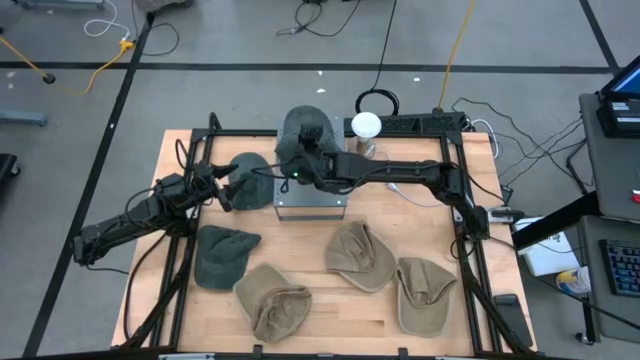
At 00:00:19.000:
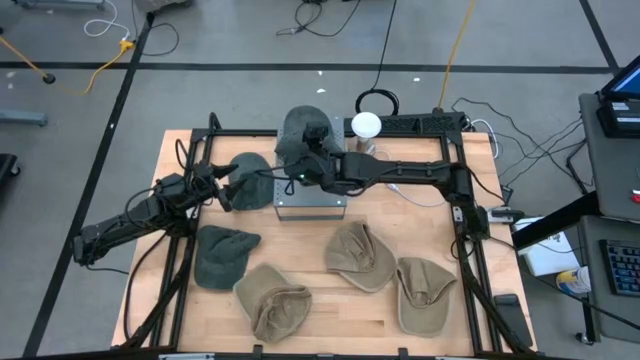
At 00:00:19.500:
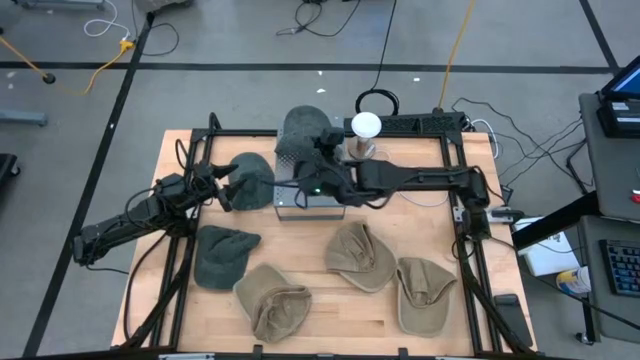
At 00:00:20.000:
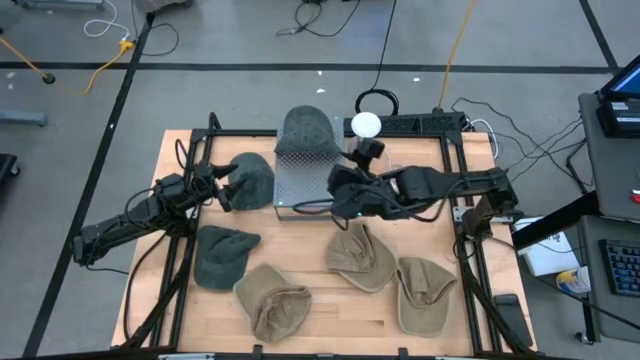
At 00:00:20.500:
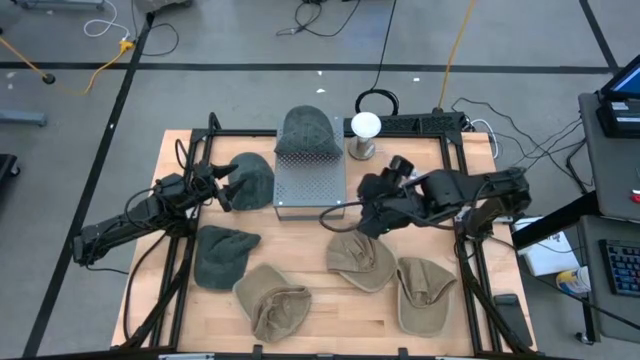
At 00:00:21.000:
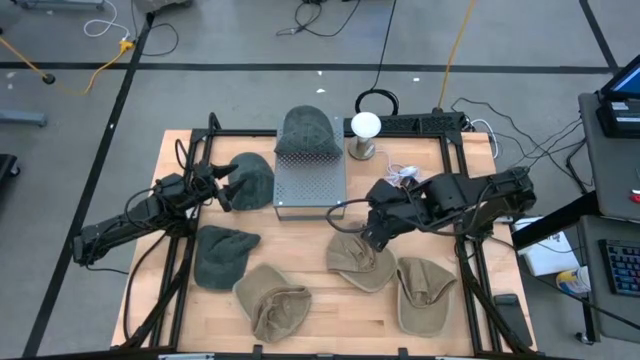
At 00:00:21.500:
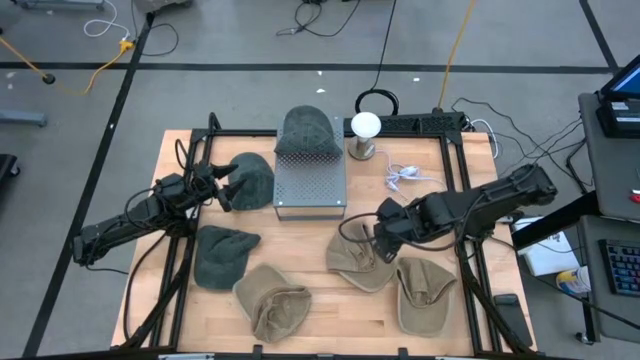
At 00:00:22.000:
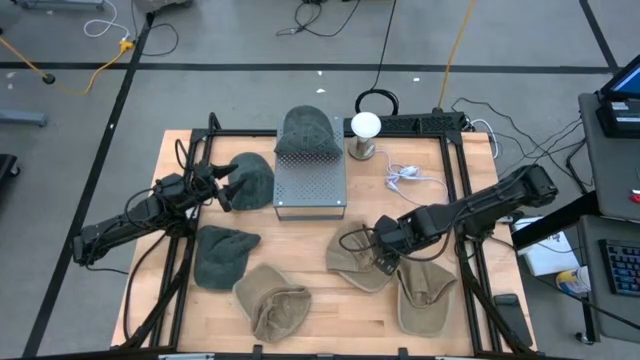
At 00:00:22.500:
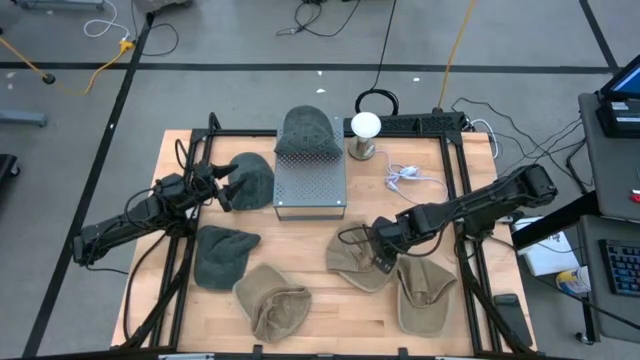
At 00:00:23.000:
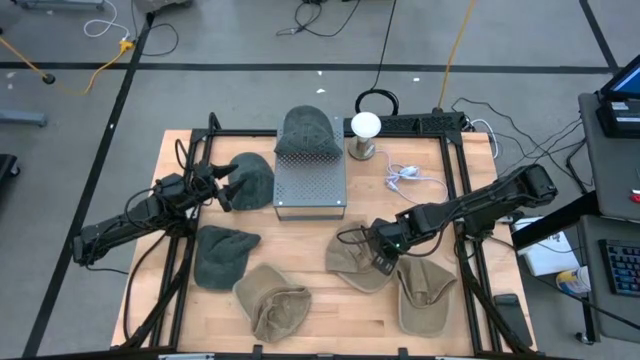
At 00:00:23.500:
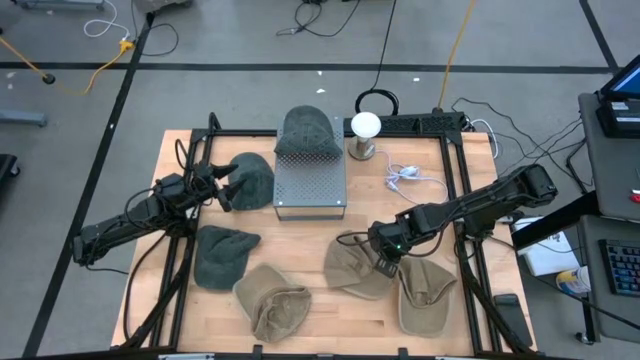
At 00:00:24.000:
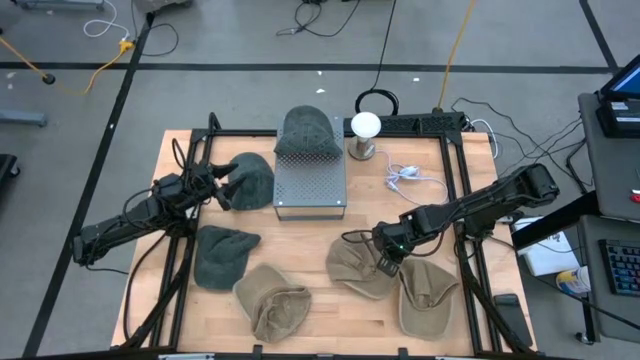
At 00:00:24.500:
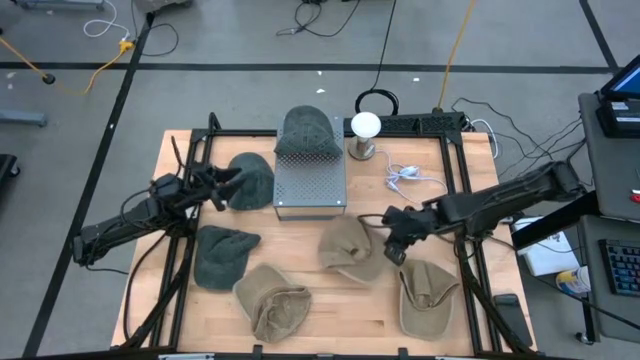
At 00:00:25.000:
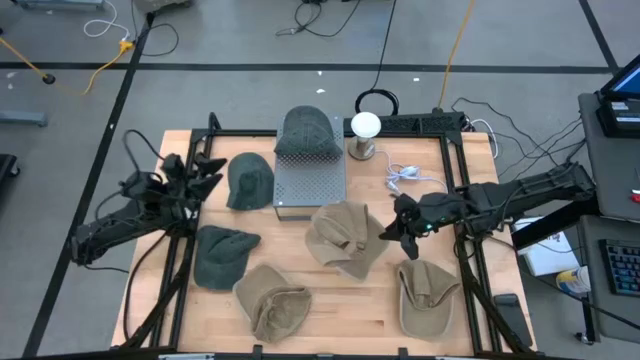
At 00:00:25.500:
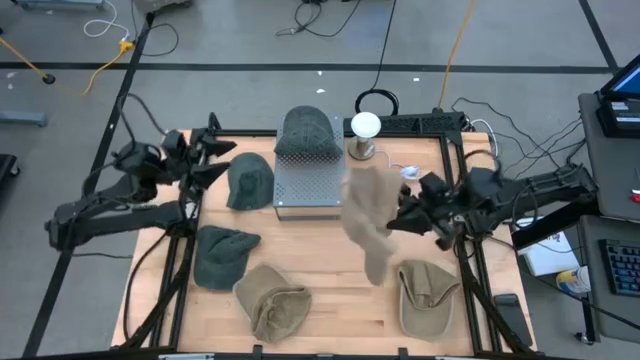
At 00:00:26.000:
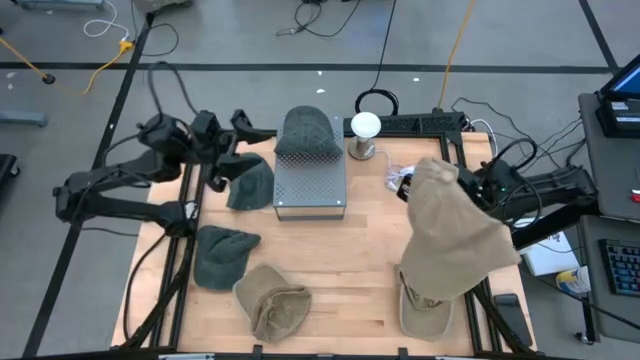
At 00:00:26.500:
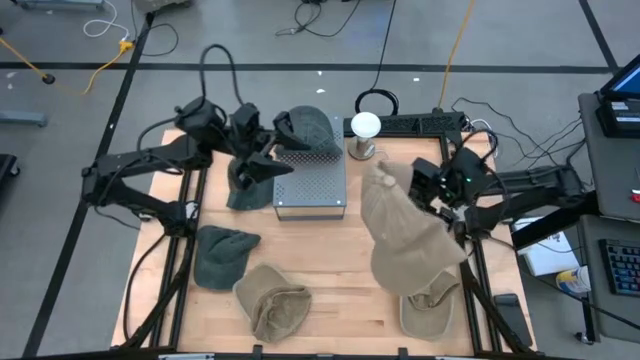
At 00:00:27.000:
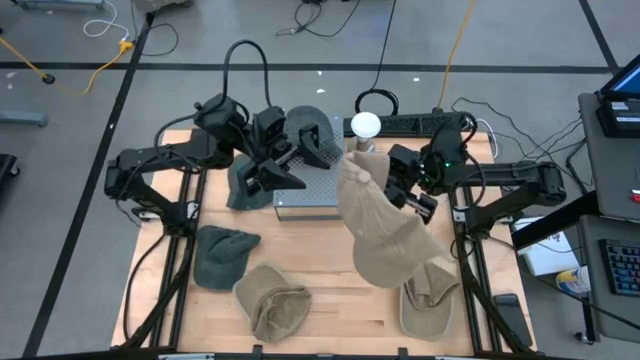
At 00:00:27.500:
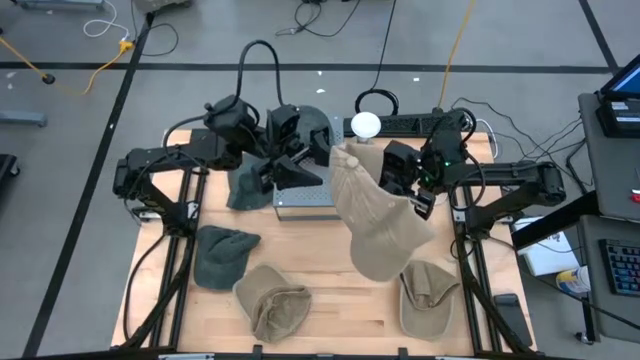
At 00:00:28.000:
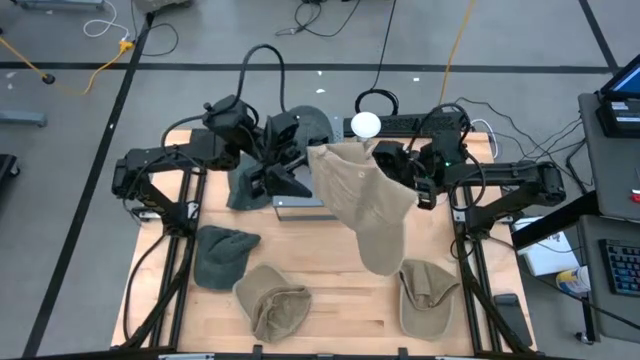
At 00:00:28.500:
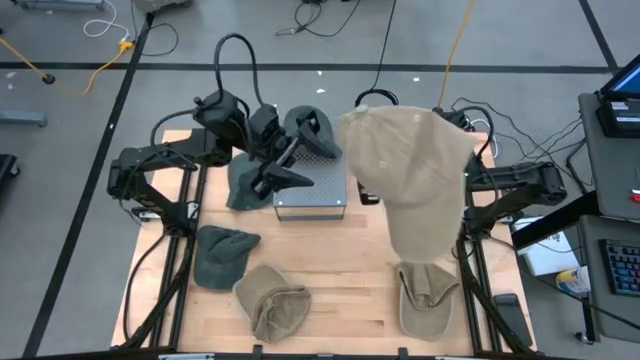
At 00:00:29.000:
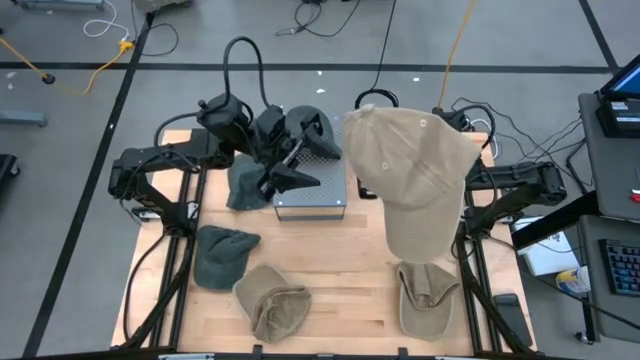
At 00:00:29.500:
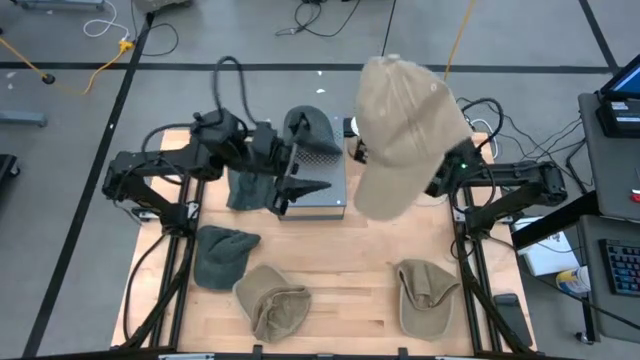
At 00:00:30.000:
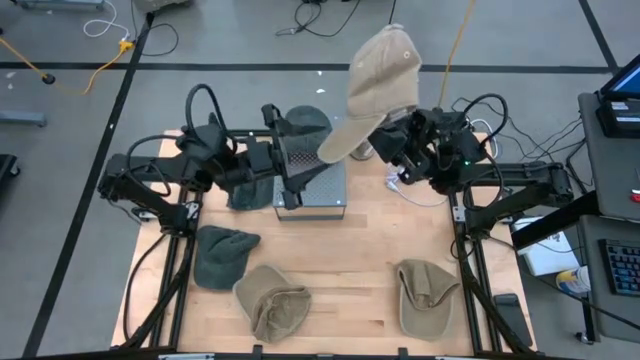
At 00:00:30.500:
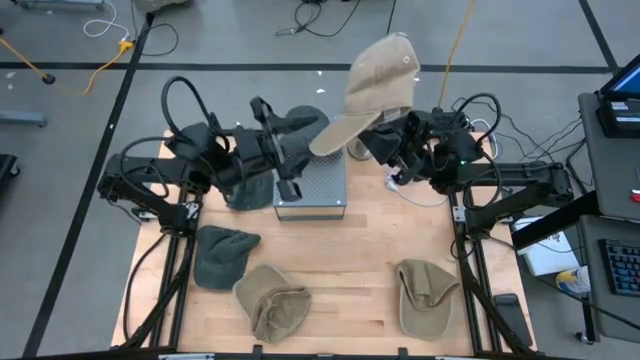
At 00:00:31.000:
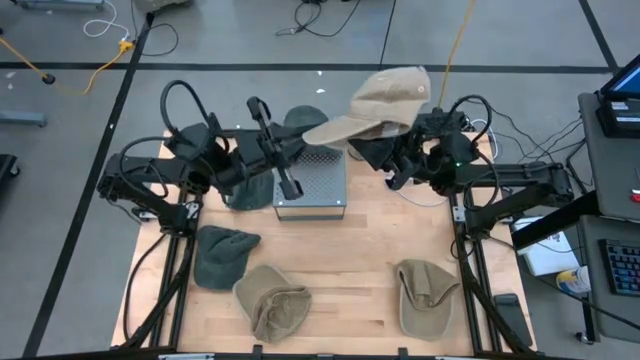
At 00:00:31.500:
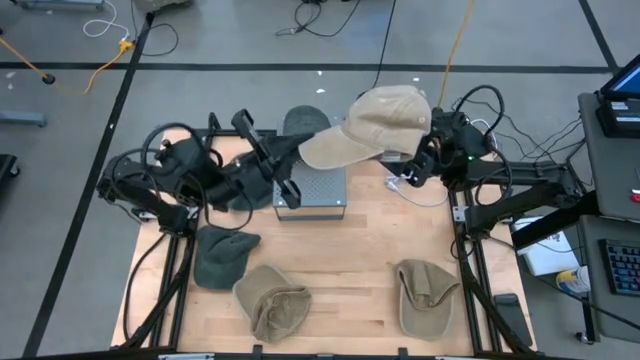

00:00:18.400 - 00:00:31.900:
Task: Pick & Place hat
Put the middle brown cap on the shelf

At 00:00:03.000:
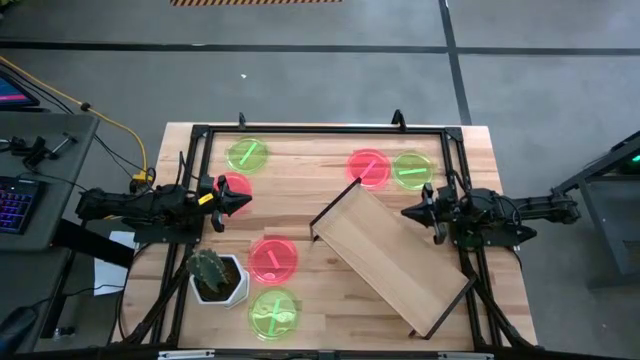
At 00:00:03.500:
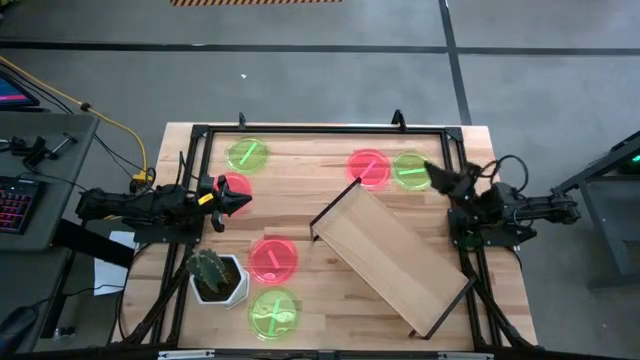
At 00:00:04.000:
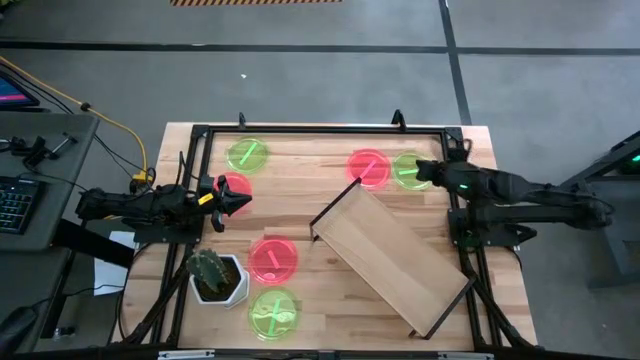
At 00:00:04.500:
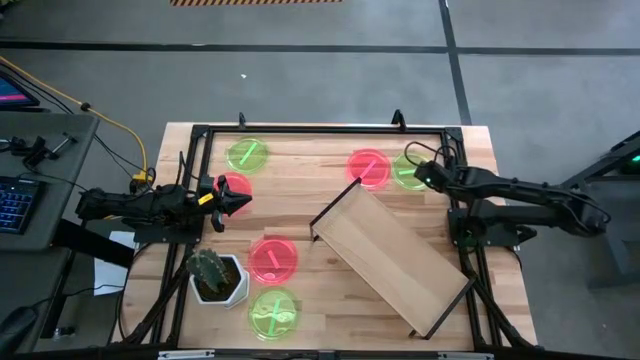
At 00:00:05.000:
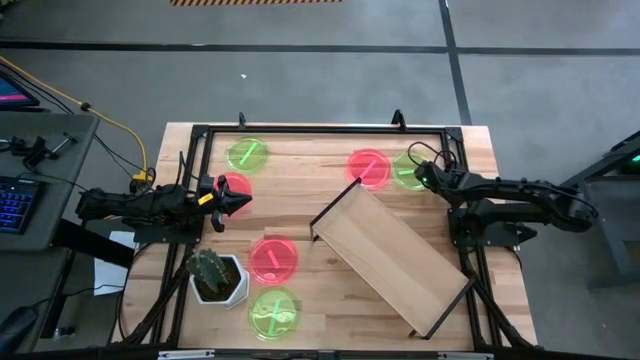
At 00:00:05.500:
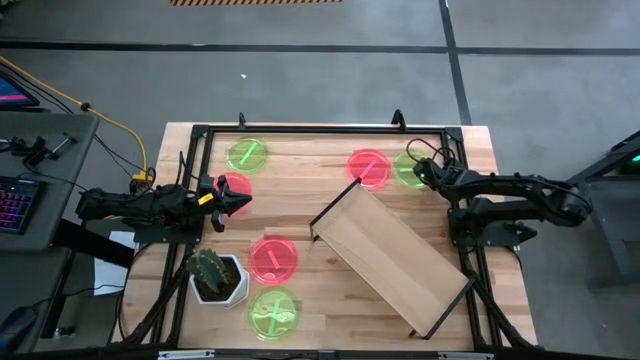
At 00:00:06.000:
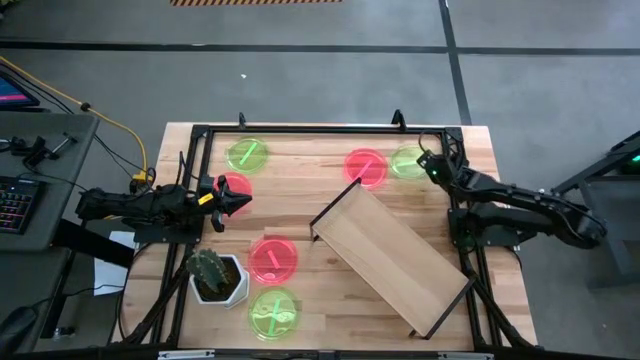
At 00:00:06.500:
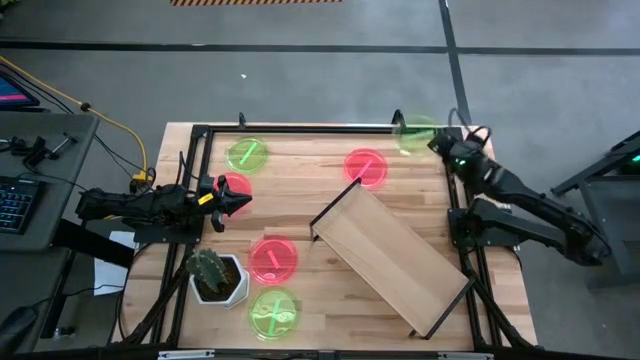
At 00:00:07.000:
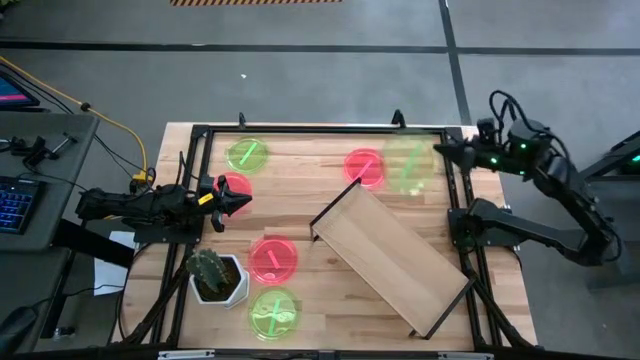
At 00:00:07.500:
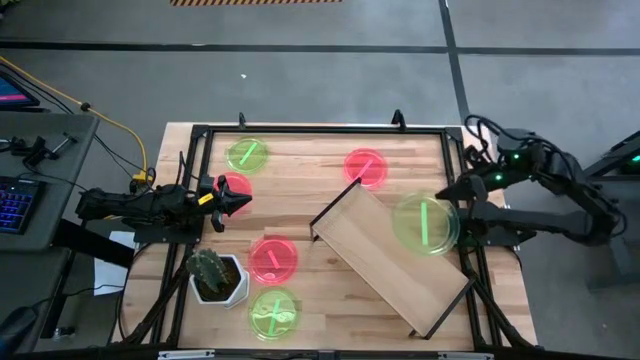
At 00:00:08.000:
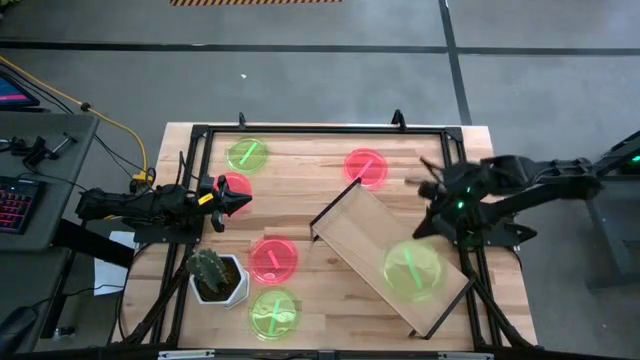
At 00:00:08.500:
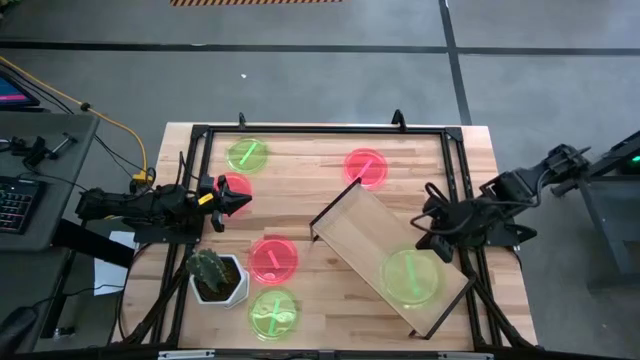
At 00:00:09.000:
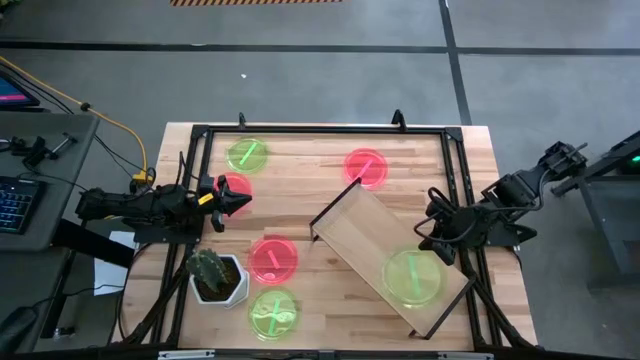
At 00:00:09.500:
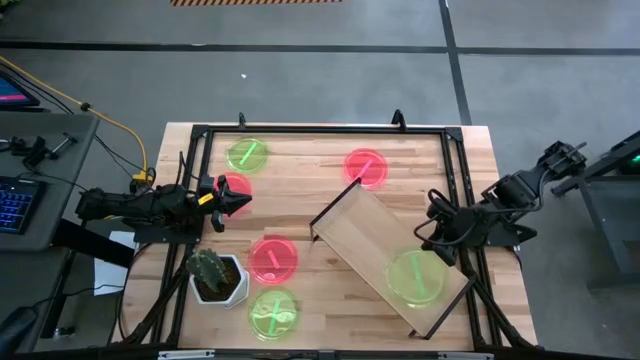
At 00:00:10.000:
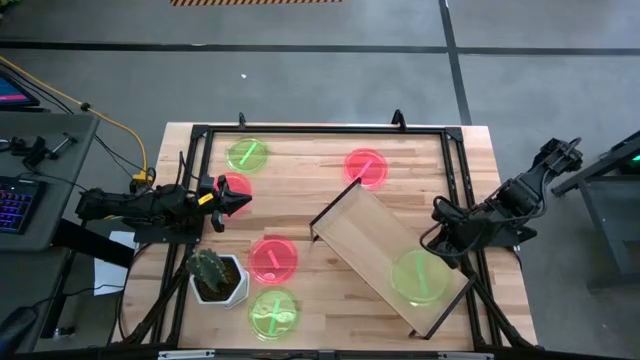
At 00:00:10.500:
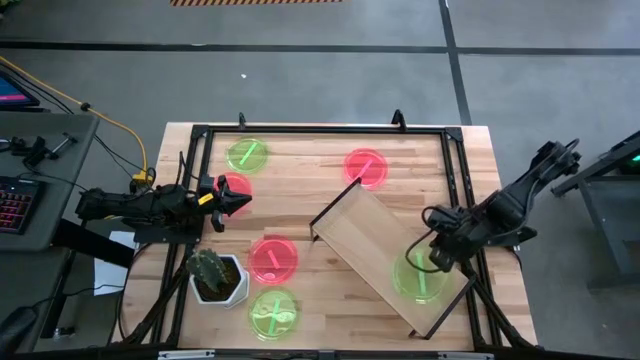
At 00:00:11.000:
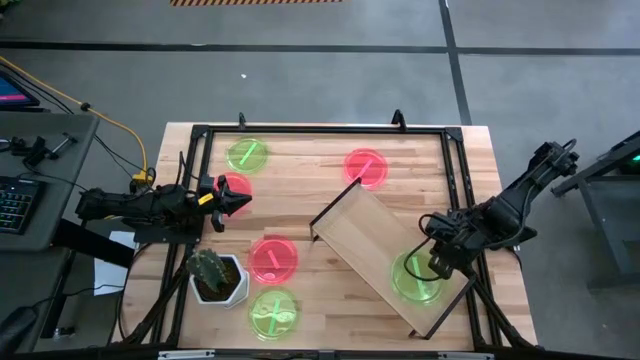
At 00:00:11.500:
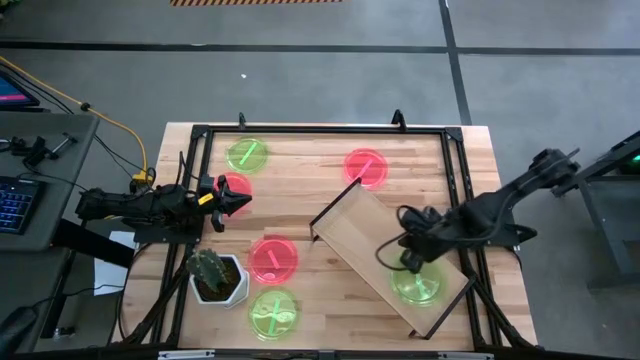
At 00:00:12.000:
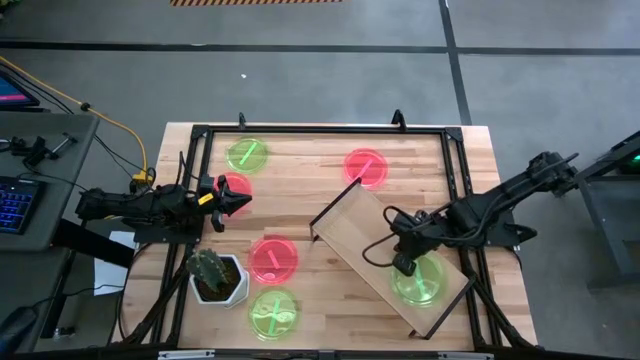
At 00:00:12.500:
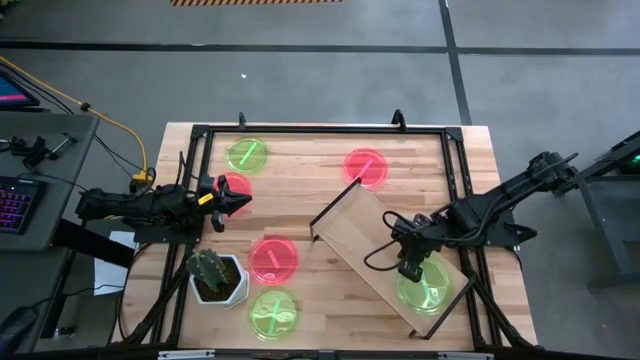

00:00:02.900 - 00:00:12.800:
Task: Place and stack plates onto a shelf
Put the top right green plate on the shelf
